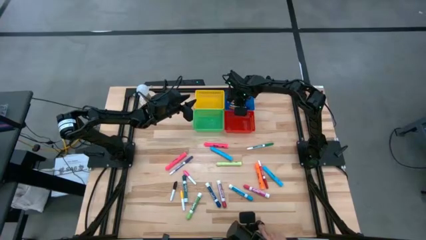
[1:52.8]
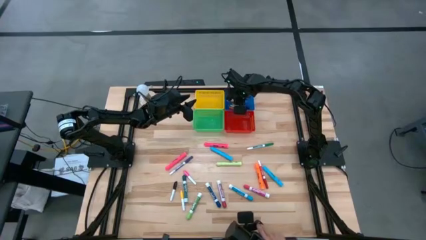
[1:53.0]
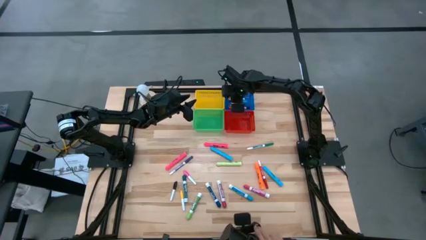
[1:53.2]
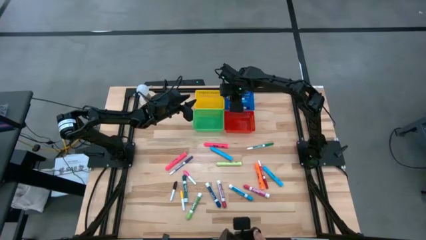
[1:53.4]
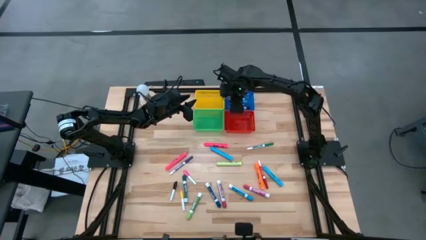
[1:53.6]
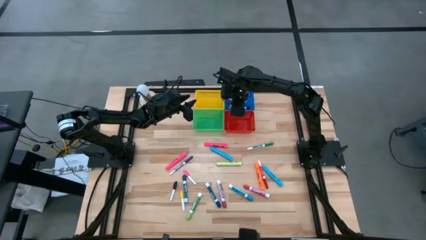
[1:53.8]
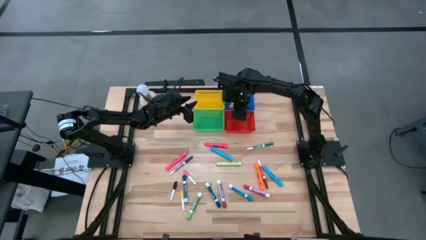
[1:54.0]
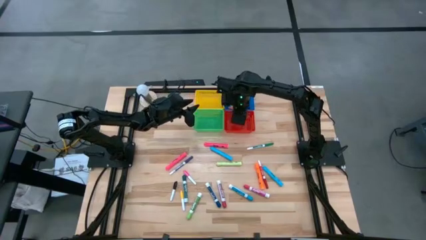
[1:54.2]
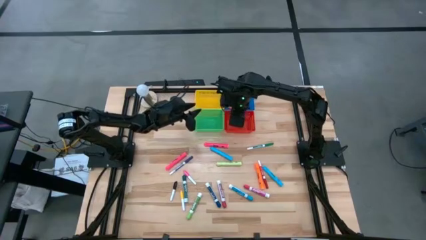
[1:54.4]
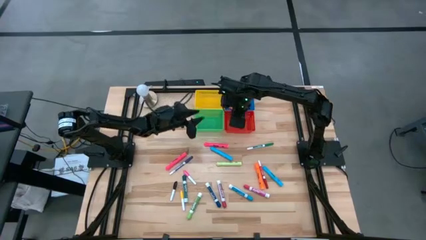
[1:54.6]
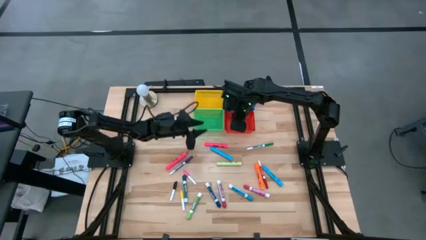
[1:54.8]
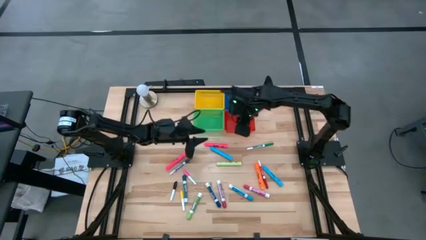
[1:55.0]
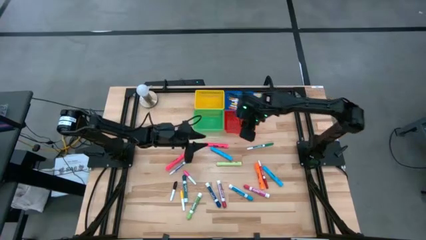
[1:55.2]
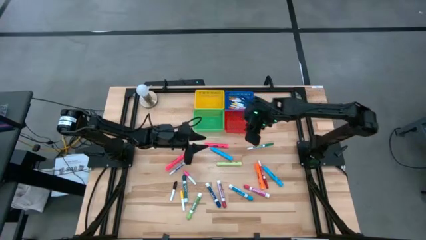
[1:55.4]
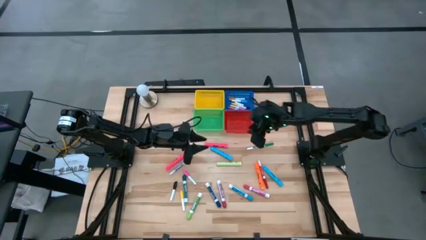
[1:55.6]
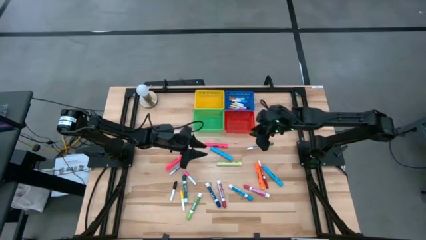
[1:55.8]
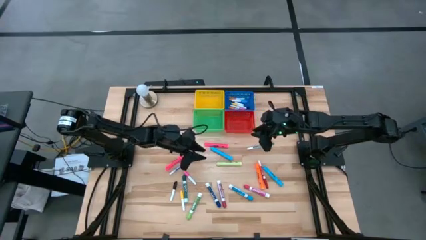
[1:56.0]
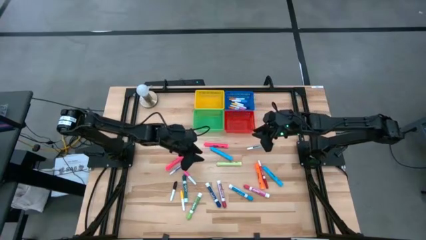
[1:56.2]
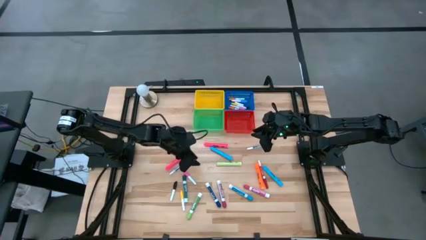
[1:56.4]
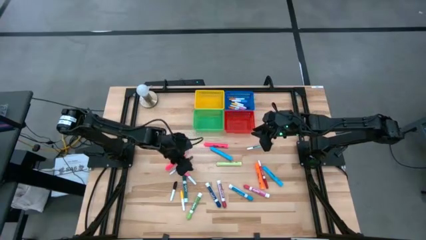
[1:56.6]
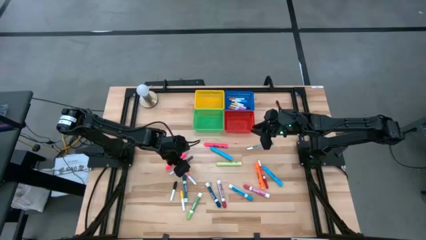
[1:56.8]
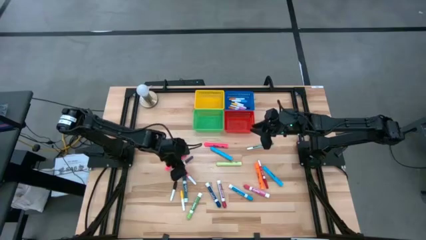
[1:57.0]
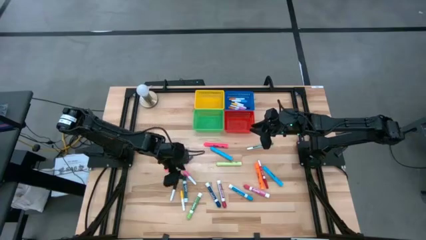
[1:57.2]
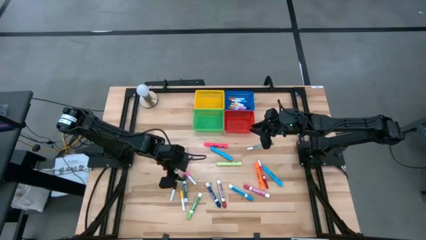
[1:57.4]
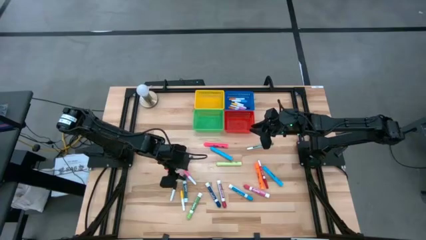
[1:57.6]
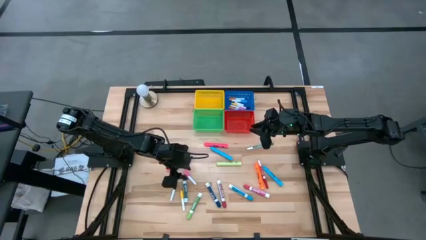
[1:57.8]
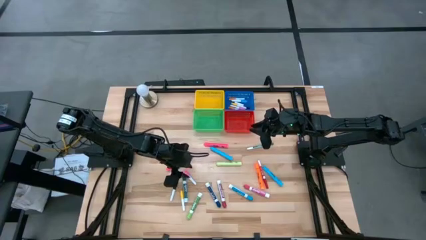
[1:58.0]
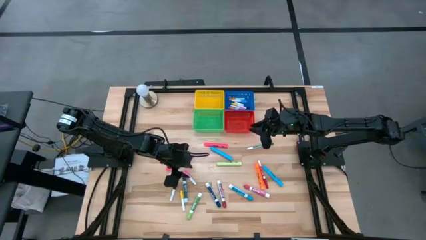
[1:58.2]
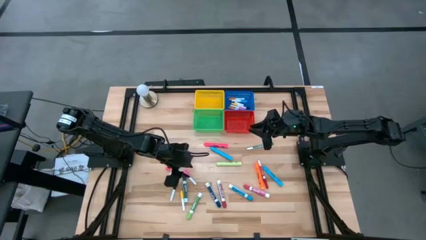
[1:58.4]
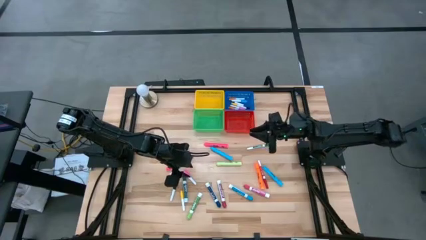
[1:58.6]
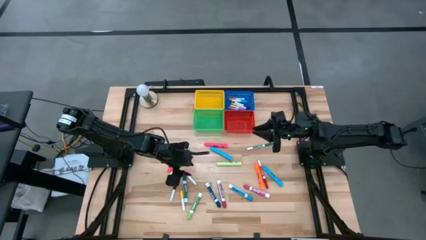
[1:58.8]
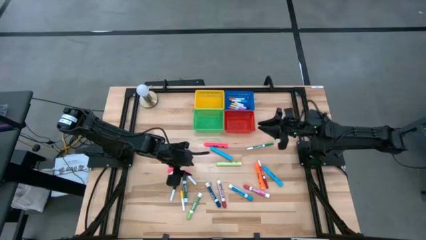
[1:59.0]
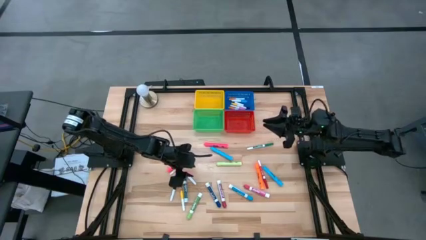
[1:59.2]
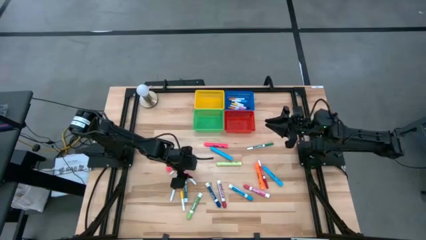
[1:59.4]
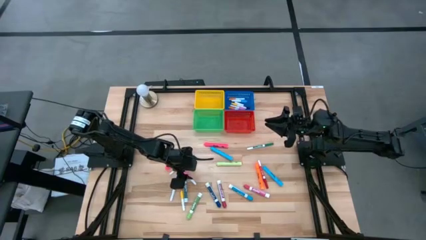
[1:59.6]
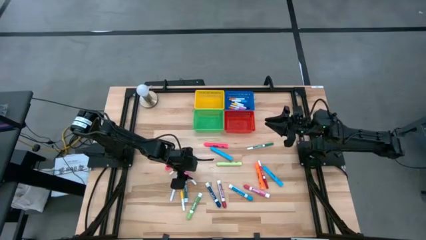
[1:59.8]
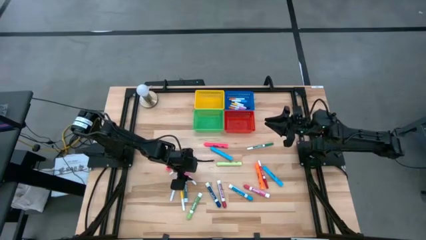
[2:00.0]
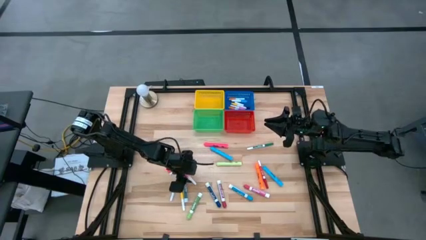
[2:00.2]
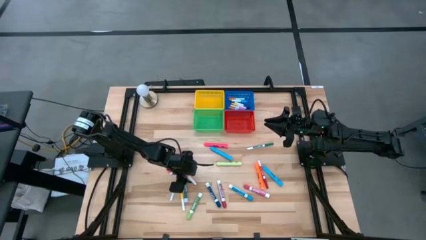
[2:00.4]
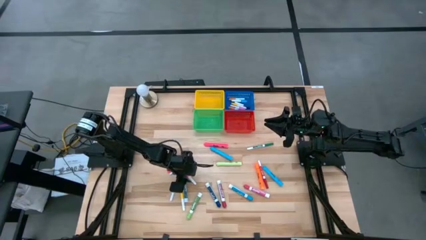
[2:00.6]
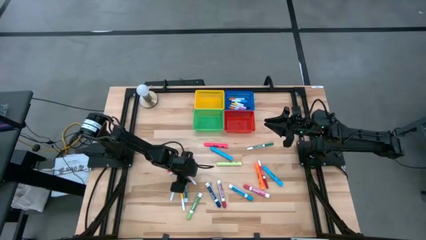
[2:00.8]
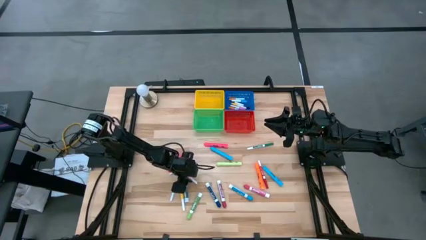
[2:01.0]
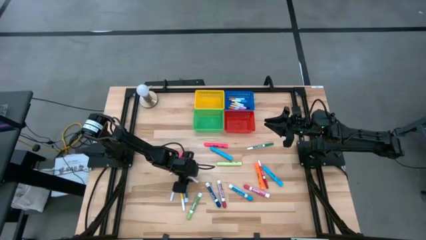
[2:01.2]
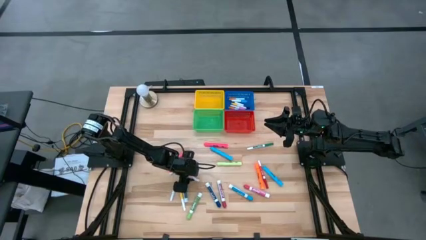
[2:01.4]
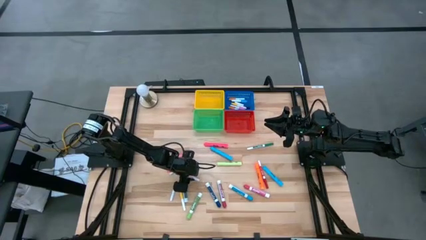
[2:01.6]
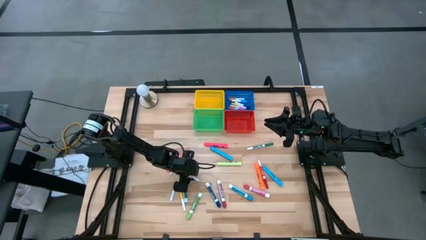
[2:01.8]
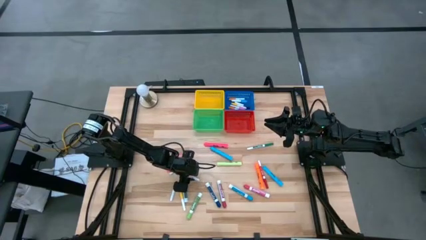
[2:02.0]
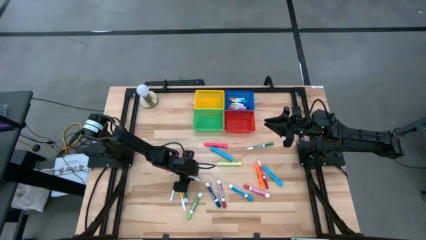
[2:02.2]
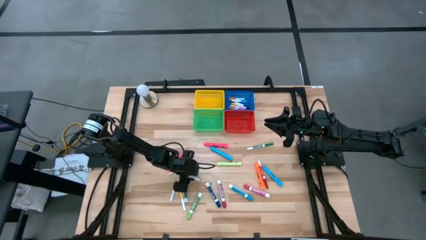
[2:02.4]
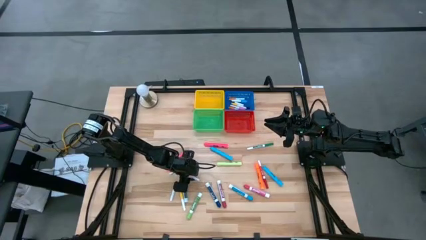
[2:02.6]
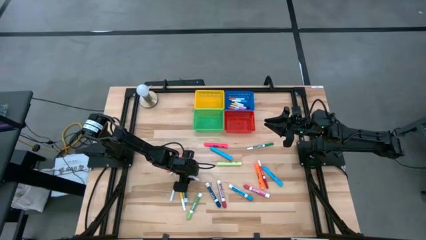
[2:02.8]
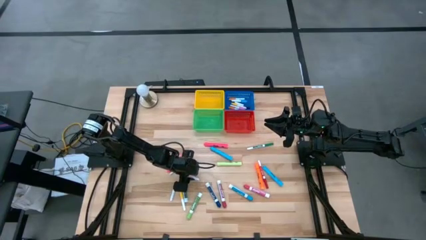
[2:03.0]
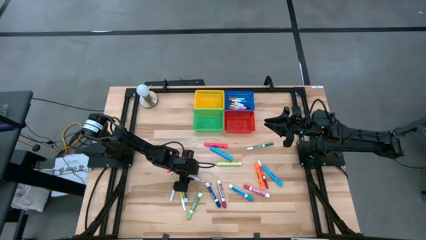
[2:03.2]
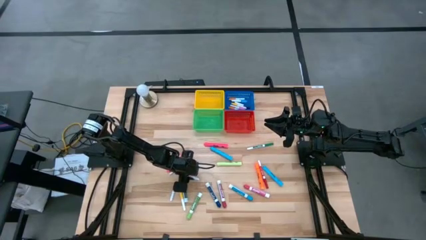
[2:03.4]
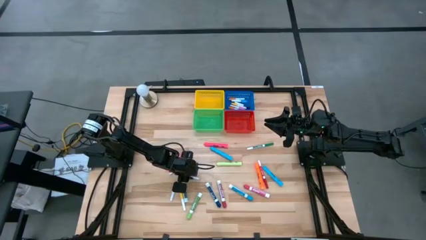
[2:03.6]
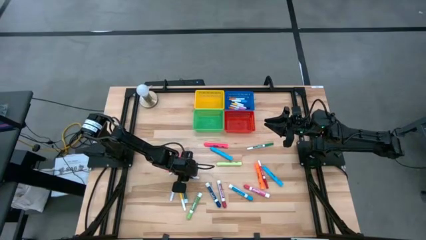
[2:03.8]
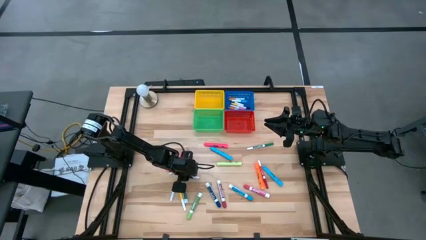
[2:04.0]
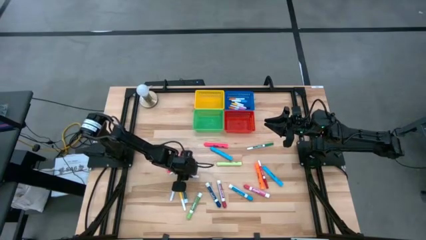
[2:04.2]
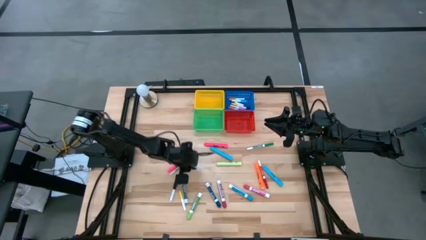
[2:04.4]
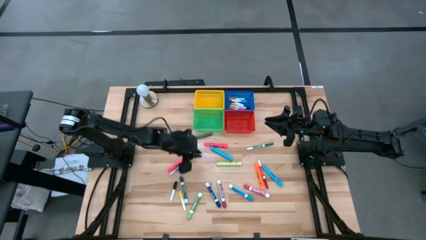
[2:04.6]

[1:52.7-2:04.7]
Task: Pick & Place Markers
Put the small pink highlighter pen into the blue bin
